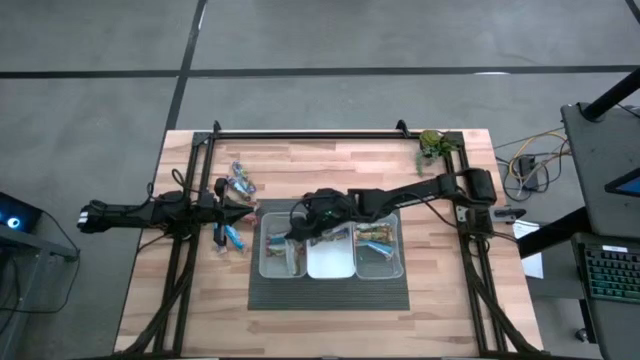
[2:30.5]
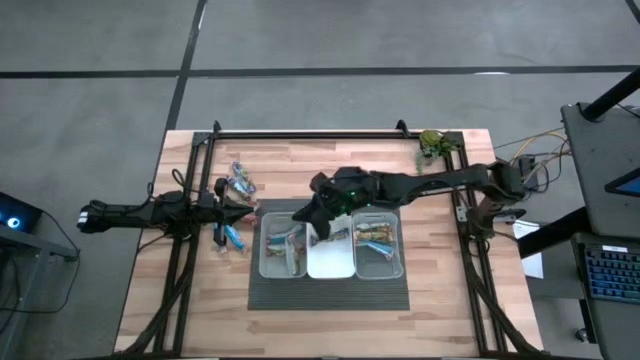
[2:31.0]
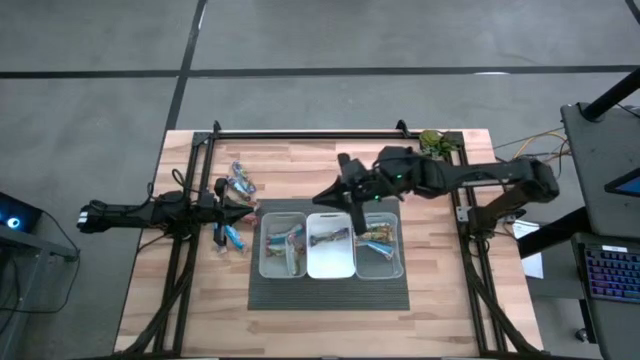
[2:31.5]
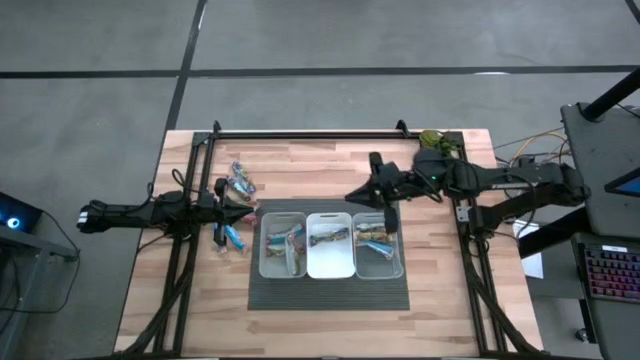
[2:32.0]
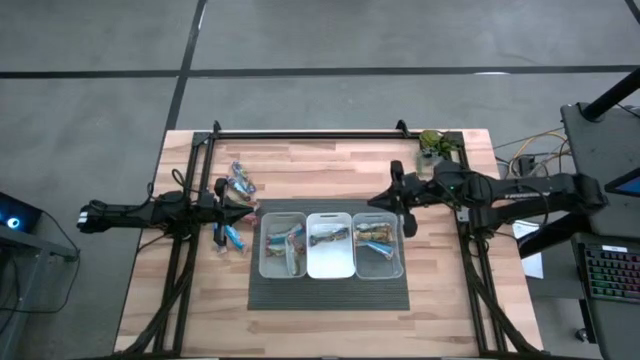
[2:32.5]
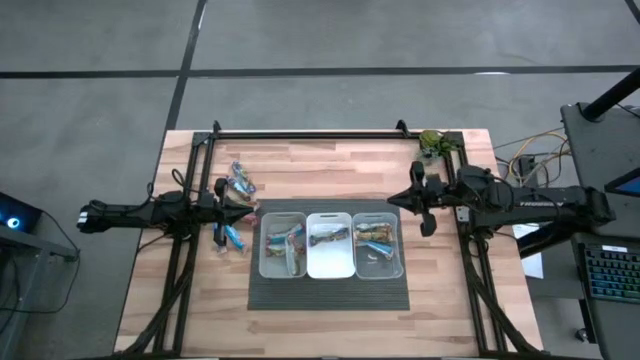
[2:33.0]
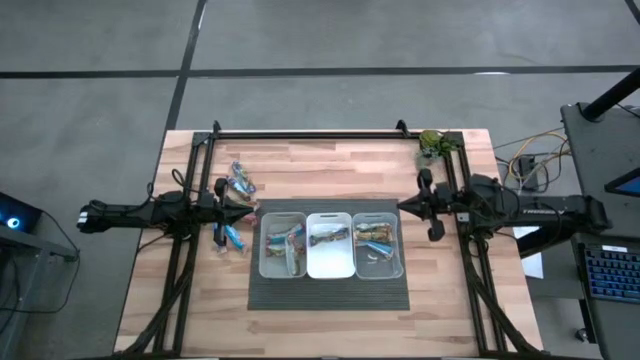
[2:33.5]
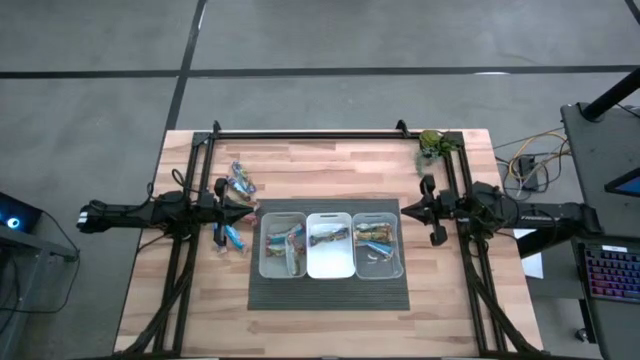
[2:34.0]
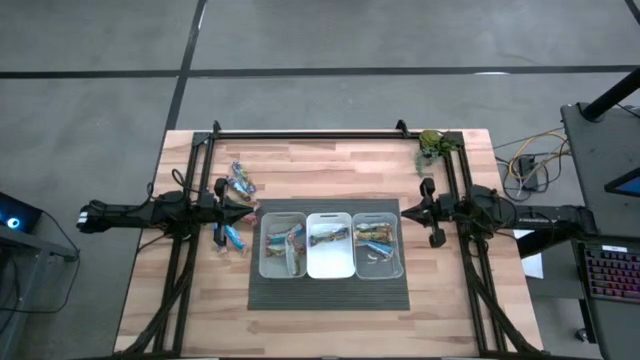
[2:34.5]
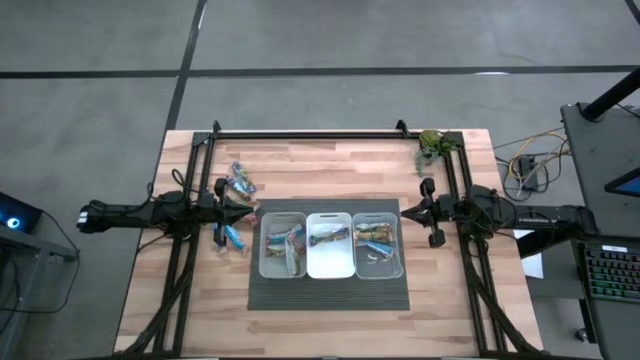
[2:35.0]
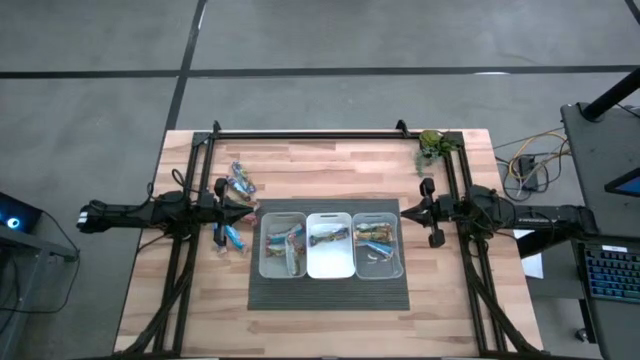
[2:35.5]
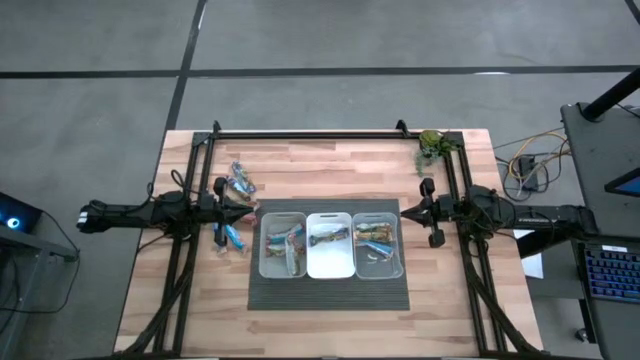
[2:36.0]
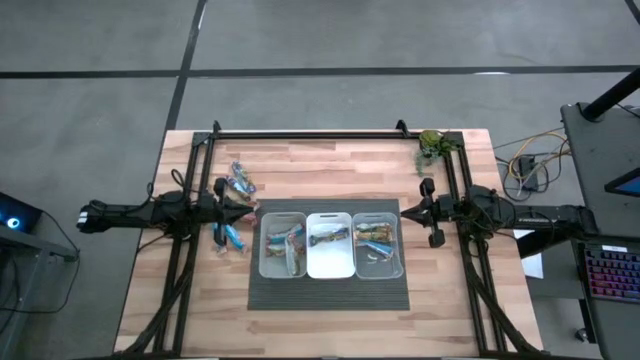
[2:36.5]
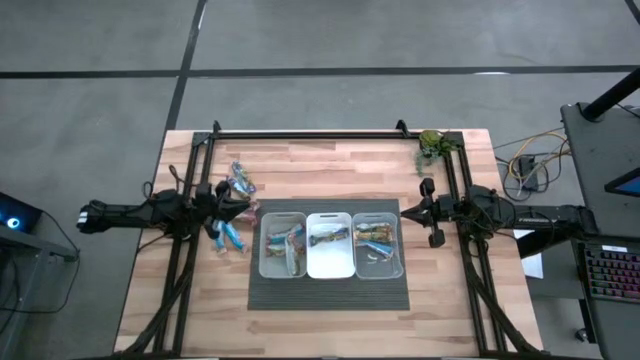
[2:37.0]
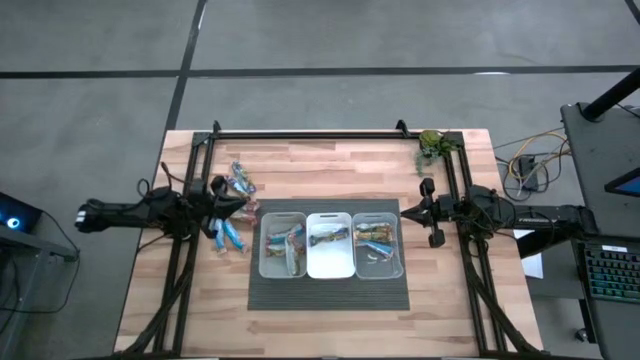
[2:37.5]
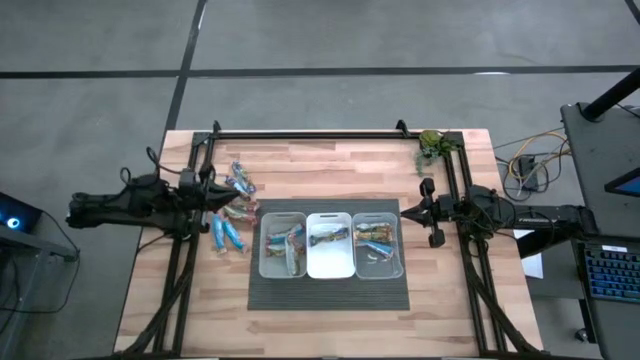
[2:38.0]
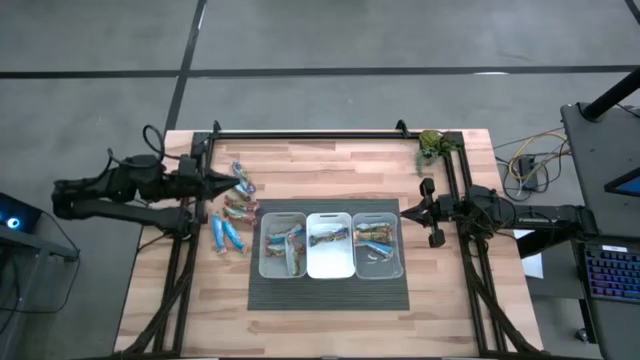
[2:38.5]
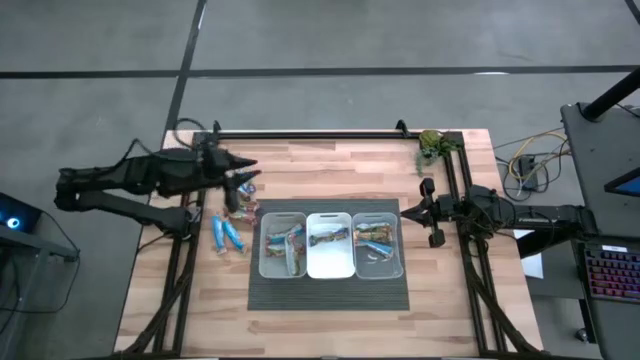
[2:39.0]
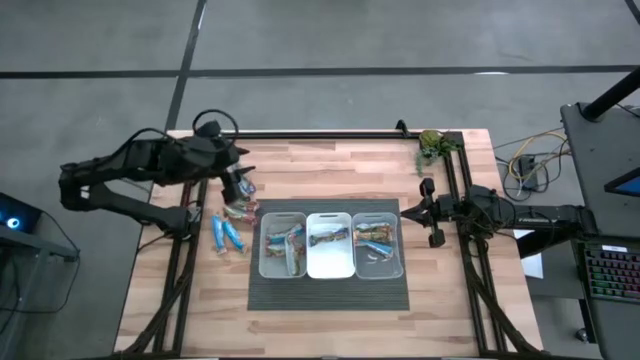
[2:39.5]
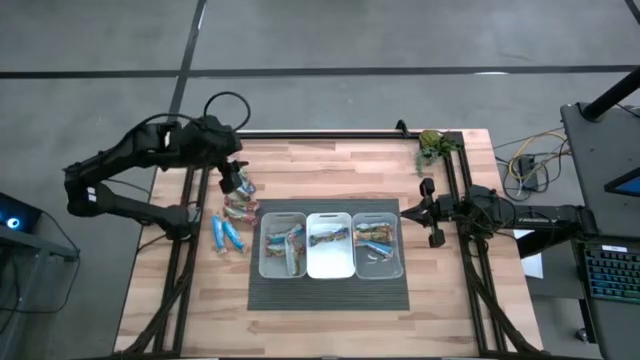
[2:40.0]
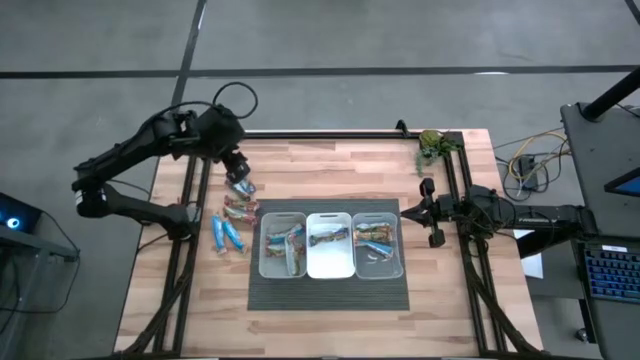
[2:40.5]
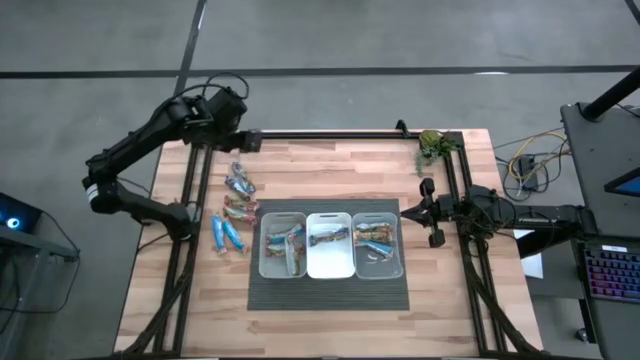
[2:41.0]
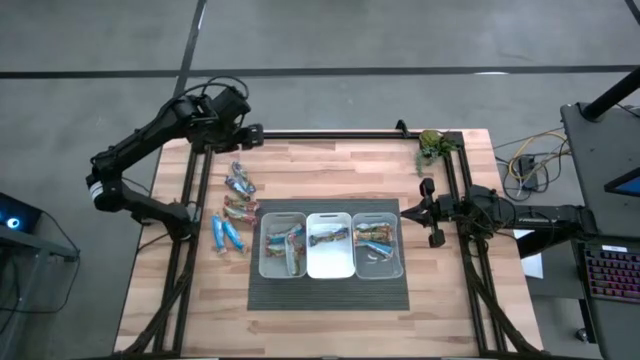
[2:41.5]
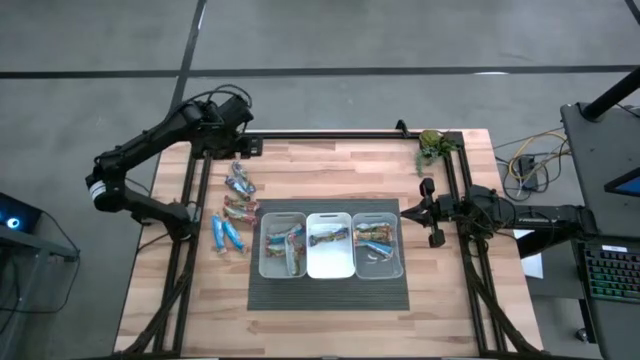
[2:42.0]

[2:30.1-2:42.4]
Task: Pick and place Granola Bars by type
Put the top blue granola bar into the white bin

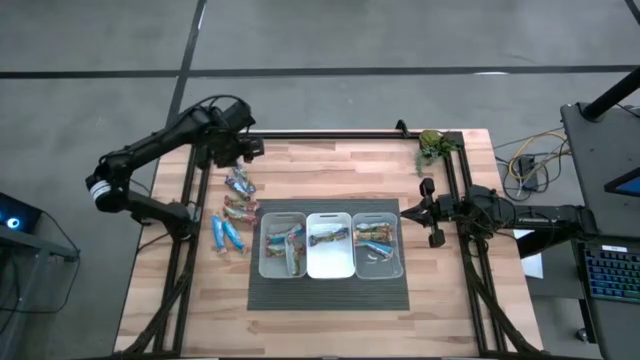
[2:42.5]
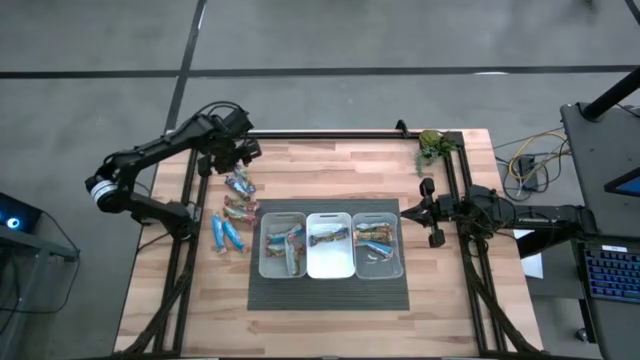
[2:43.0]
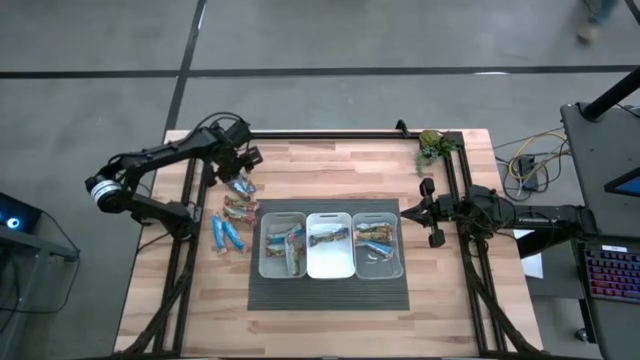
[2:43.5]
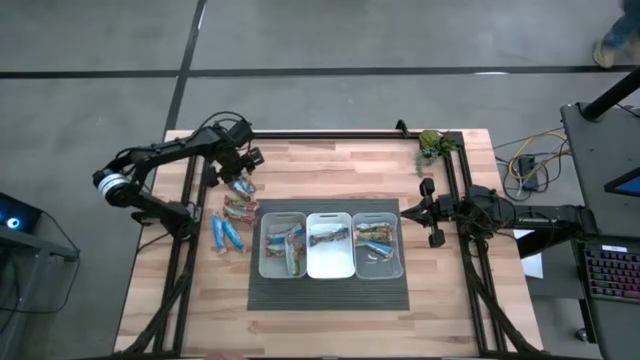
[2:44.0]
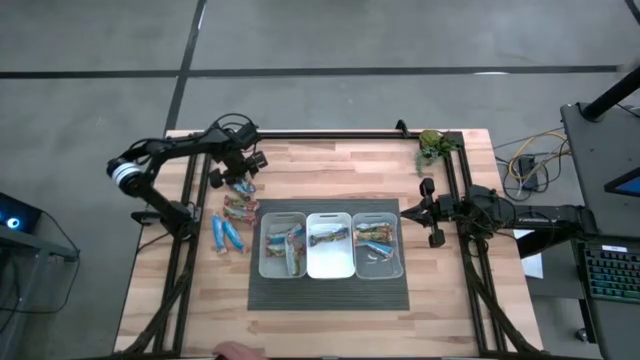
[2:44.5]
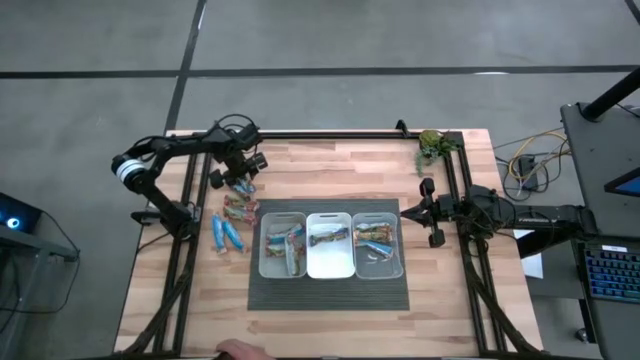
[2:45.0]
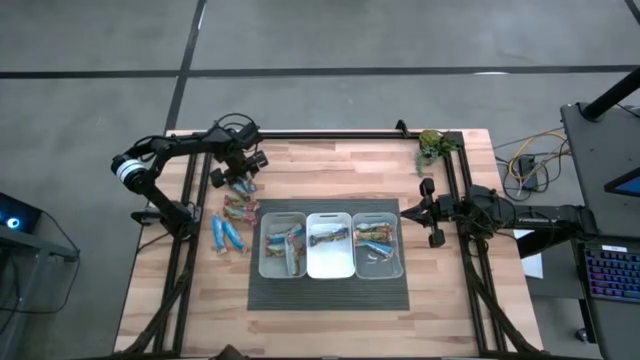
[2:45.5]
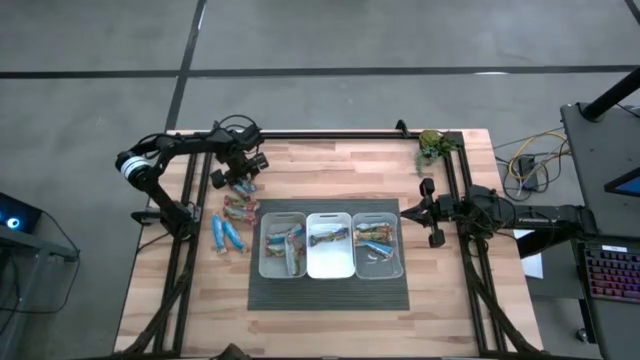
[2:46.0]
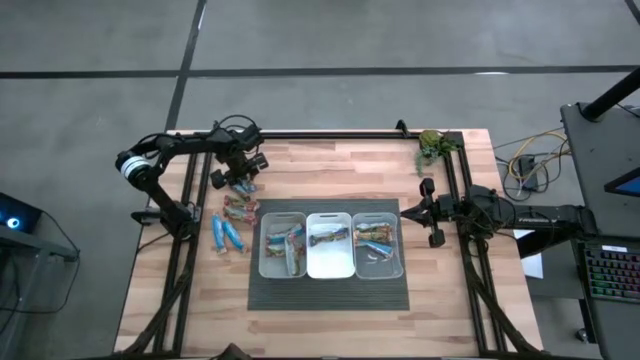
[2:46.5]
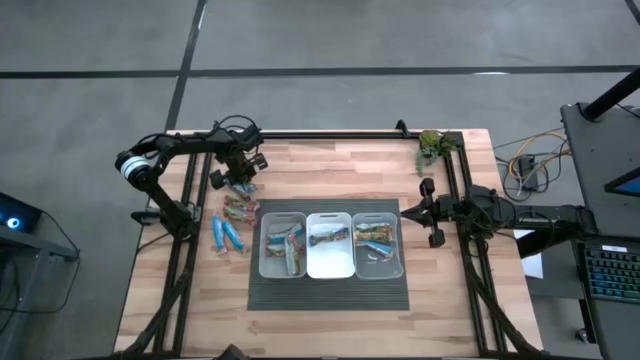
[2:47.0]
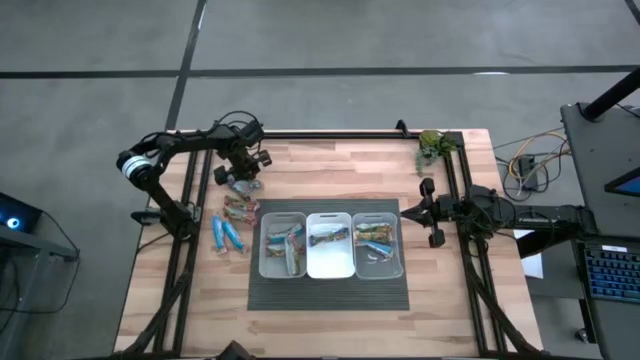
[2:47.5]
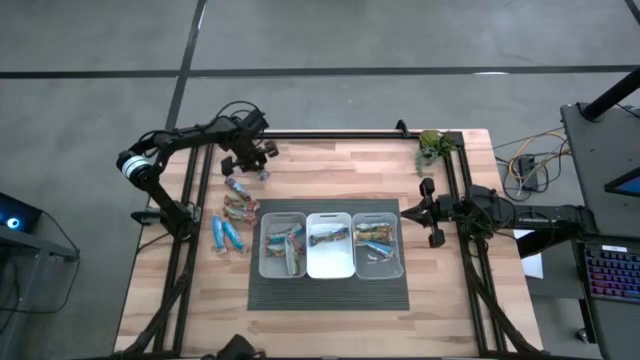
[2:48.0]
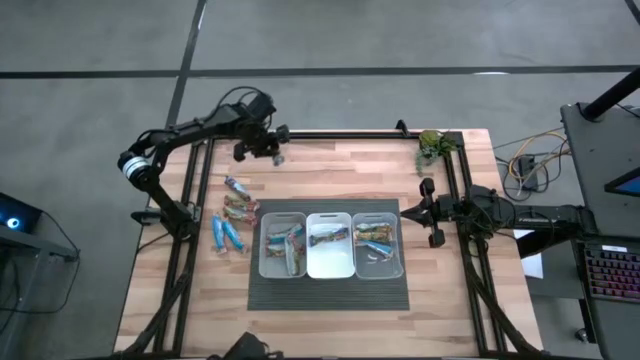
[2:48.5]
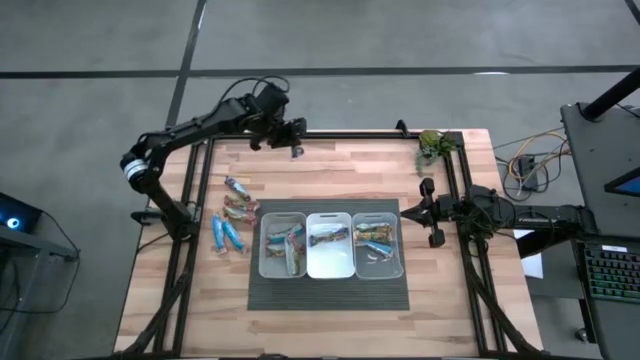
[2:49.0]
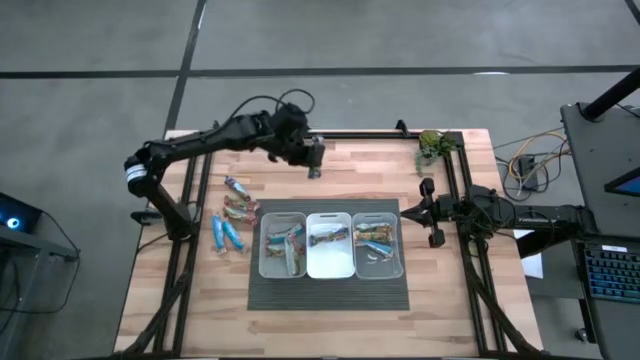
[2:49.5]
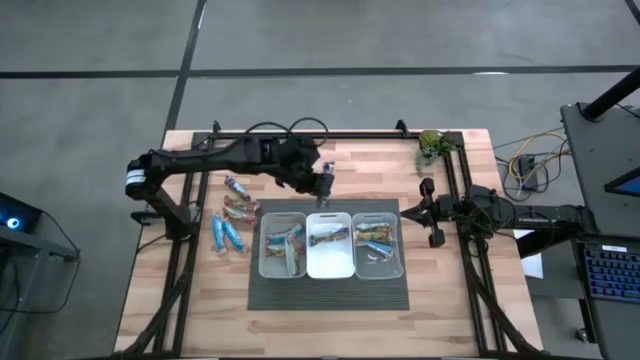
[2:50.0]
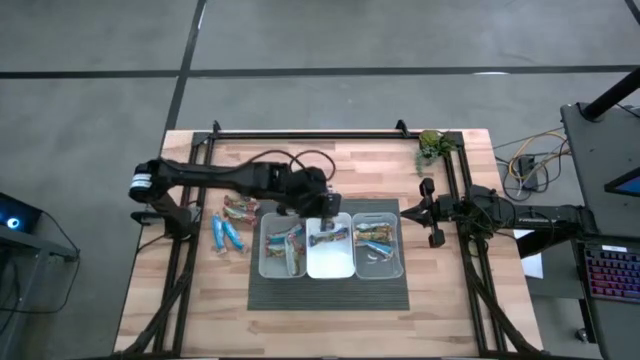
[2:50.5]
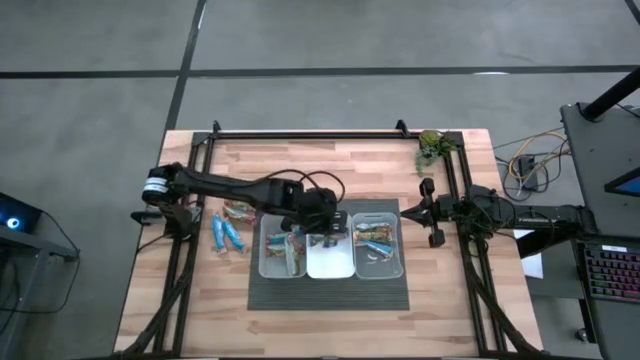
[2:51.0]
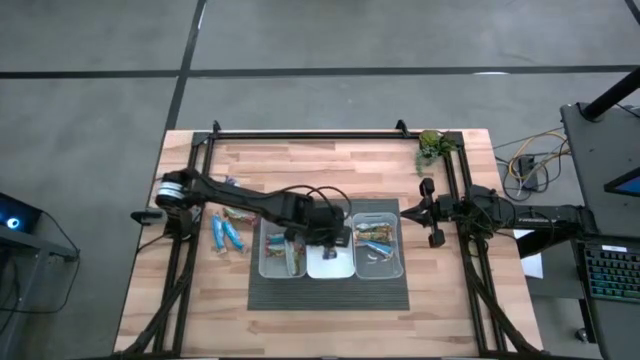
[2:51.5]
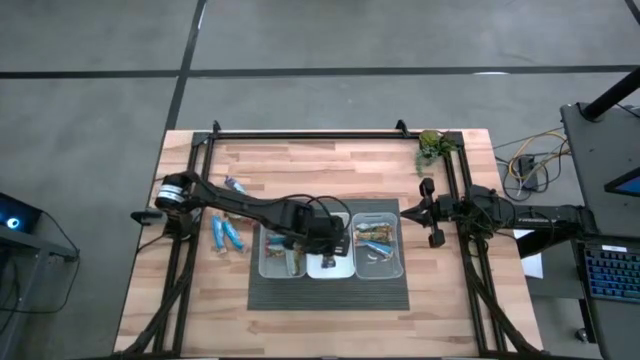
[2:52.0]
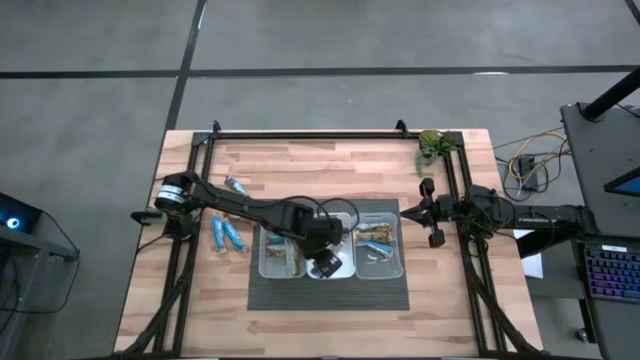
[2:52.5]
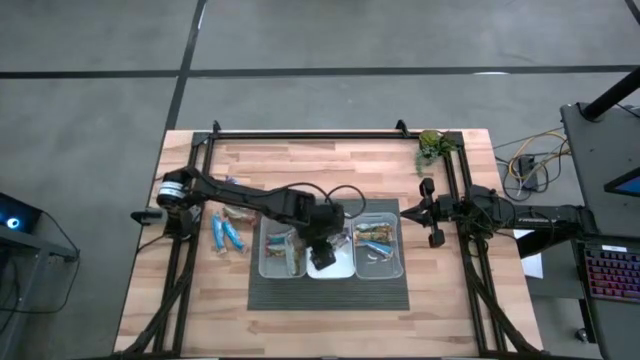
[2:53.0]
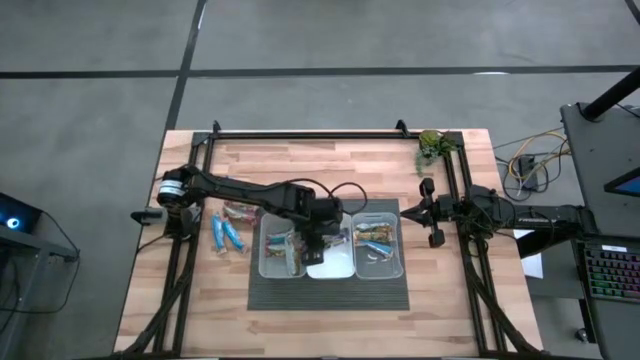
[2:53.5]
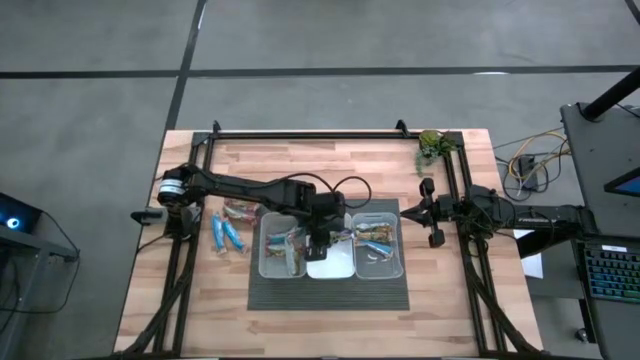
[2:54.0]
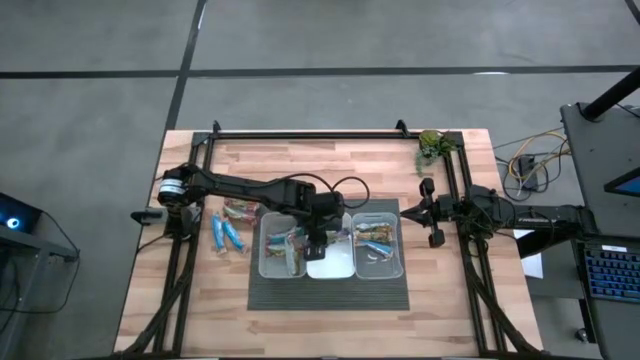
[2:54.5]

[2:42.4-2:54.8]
Put the top blue granola bar into the white bin
